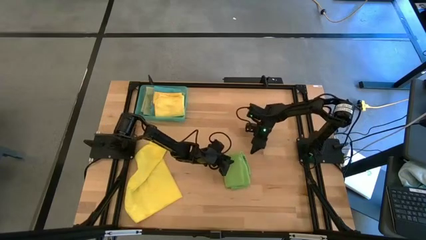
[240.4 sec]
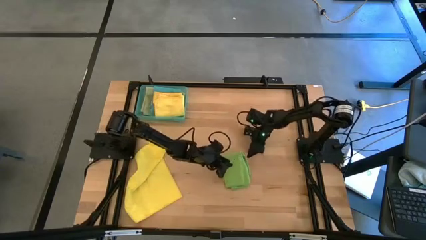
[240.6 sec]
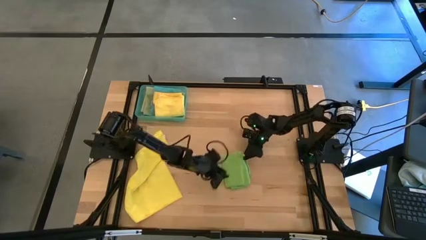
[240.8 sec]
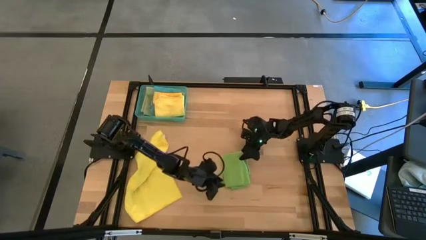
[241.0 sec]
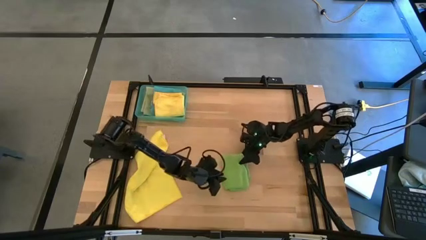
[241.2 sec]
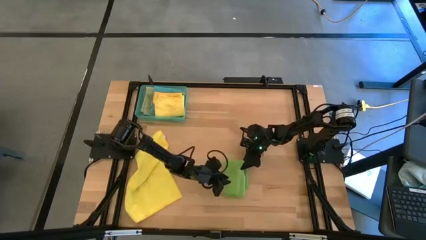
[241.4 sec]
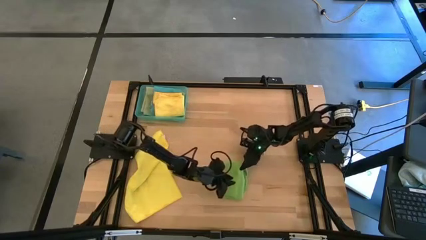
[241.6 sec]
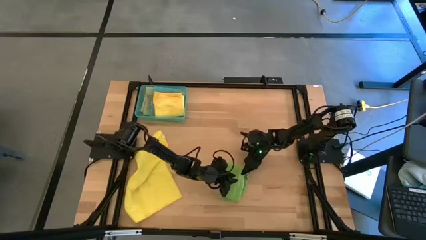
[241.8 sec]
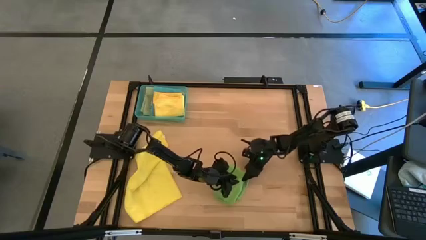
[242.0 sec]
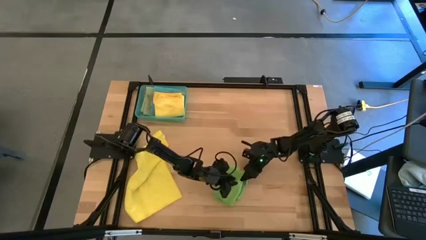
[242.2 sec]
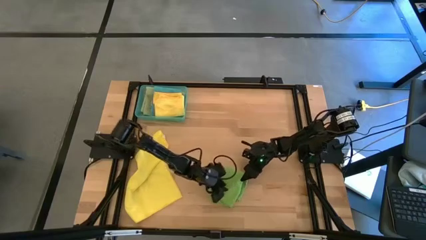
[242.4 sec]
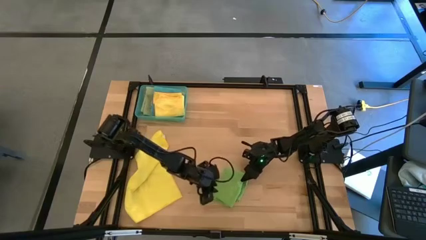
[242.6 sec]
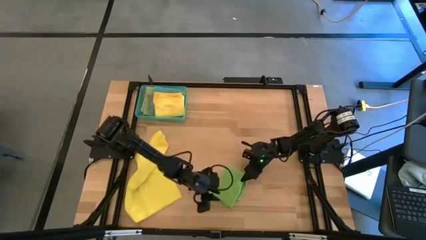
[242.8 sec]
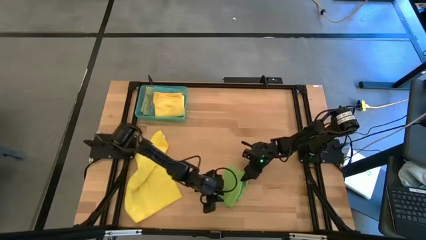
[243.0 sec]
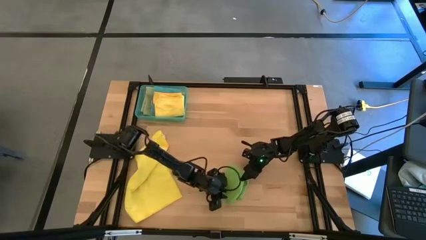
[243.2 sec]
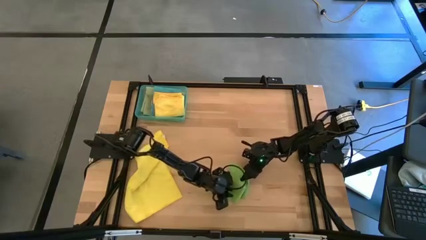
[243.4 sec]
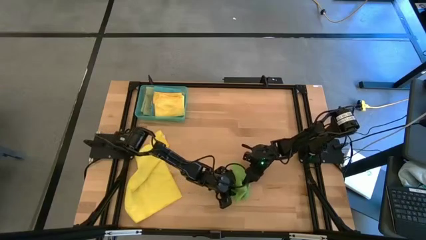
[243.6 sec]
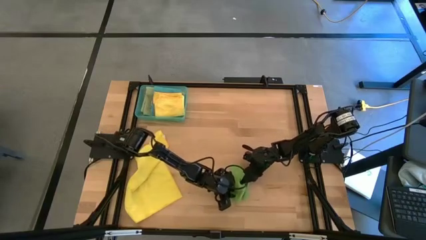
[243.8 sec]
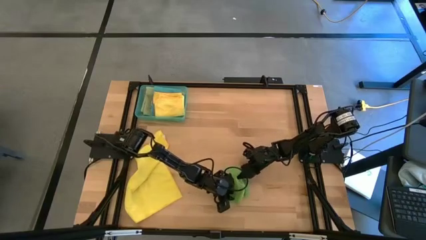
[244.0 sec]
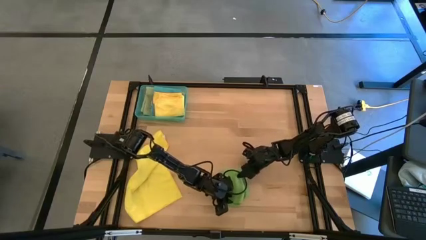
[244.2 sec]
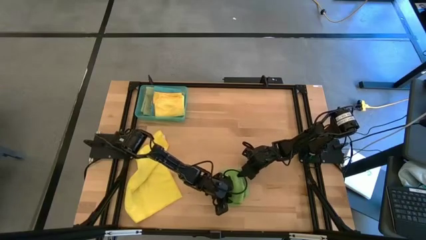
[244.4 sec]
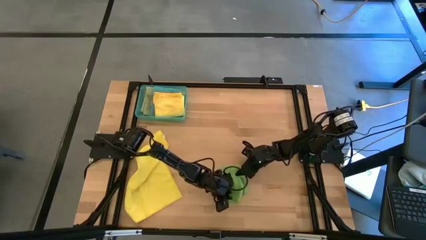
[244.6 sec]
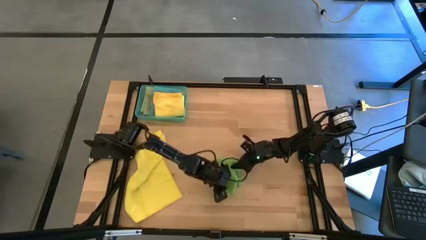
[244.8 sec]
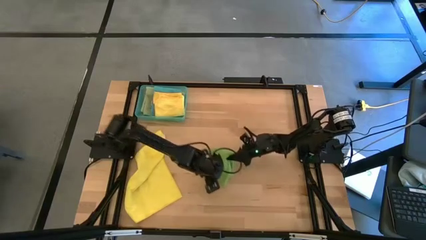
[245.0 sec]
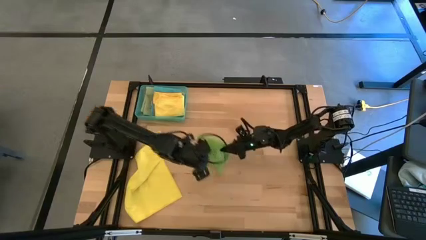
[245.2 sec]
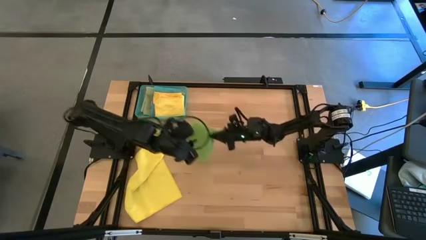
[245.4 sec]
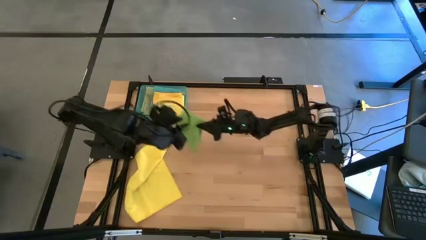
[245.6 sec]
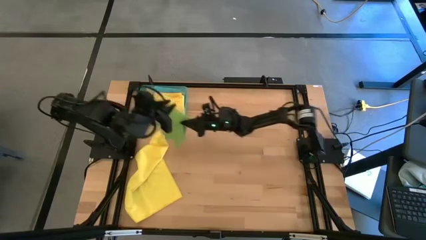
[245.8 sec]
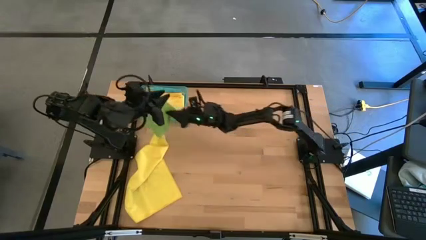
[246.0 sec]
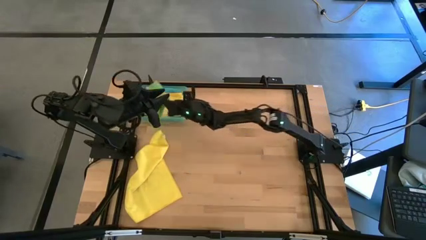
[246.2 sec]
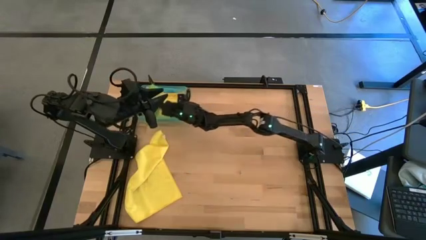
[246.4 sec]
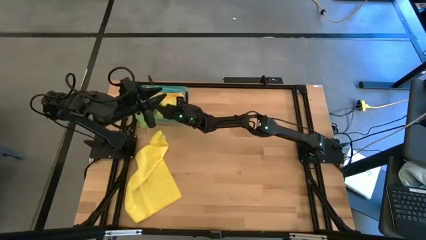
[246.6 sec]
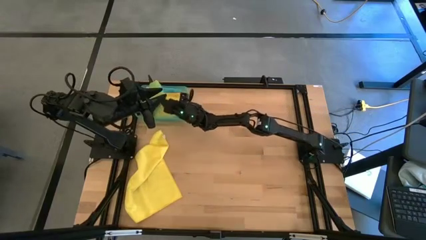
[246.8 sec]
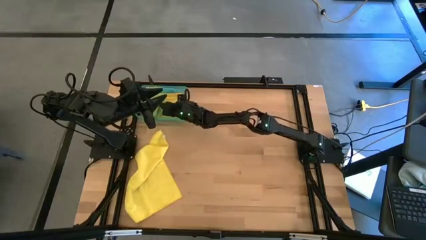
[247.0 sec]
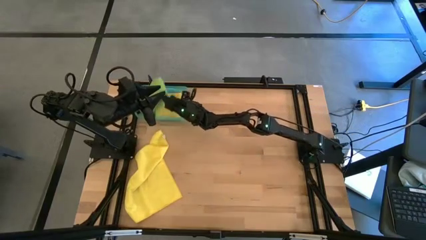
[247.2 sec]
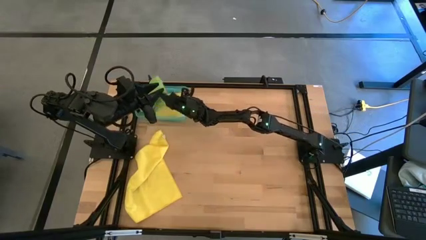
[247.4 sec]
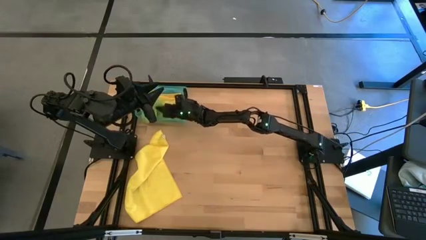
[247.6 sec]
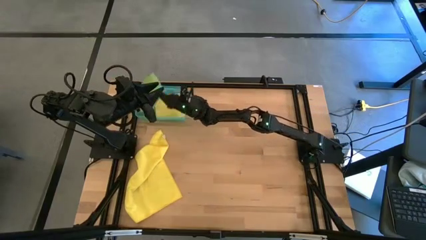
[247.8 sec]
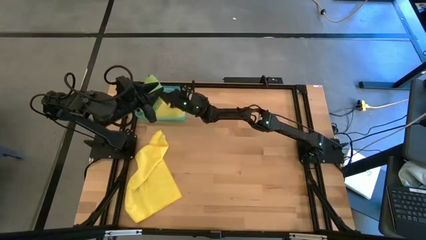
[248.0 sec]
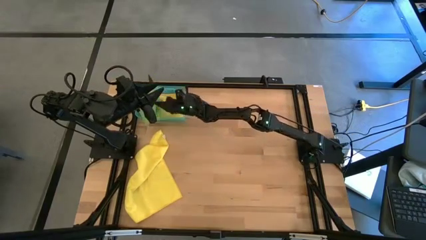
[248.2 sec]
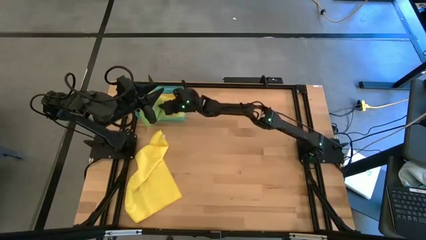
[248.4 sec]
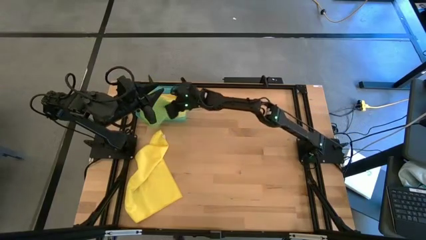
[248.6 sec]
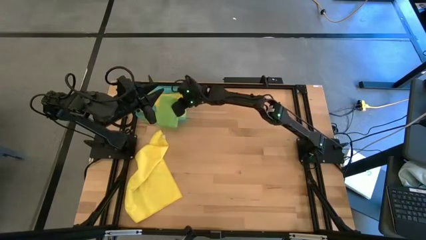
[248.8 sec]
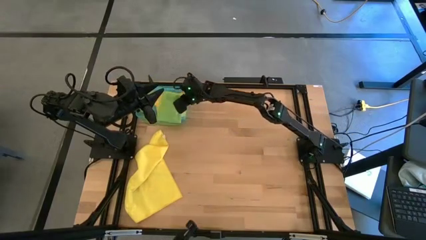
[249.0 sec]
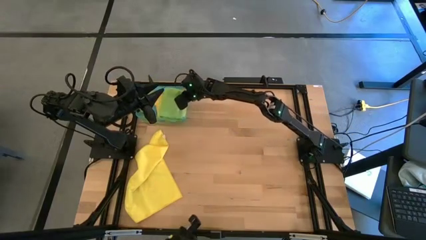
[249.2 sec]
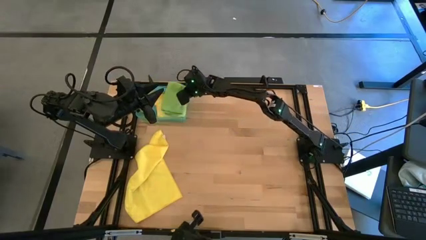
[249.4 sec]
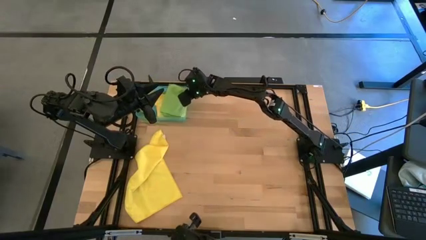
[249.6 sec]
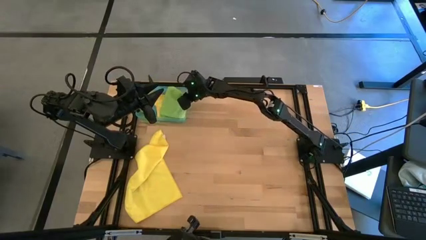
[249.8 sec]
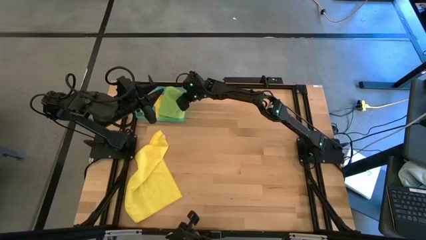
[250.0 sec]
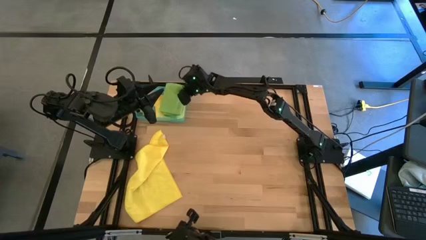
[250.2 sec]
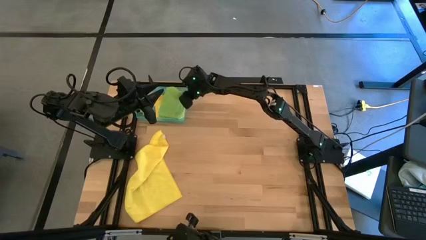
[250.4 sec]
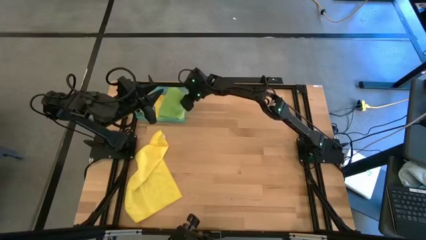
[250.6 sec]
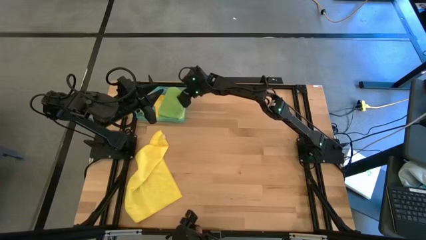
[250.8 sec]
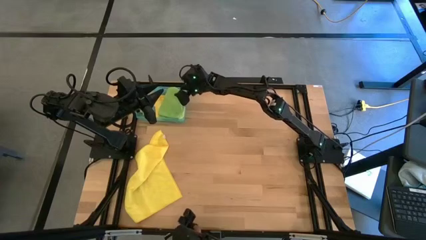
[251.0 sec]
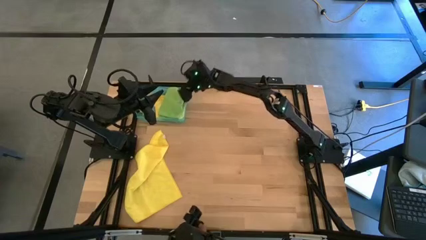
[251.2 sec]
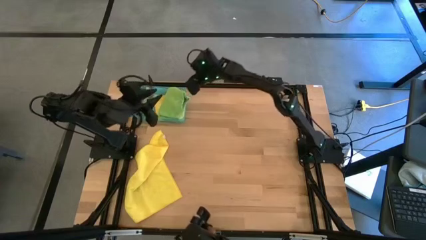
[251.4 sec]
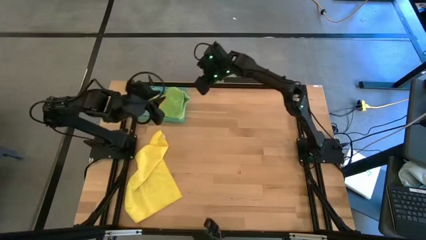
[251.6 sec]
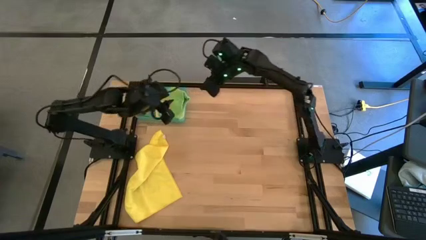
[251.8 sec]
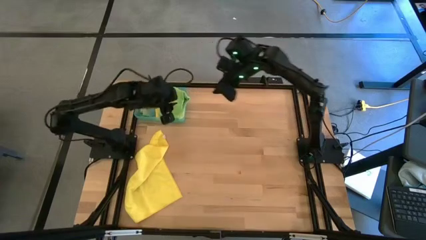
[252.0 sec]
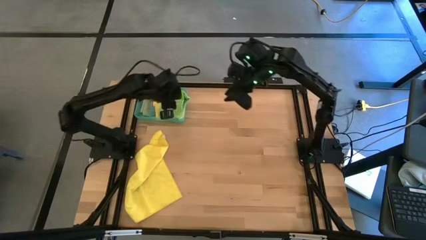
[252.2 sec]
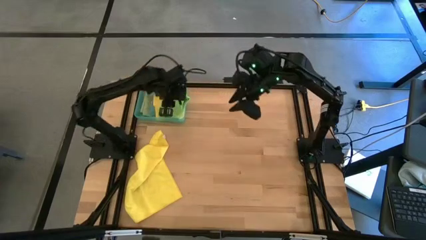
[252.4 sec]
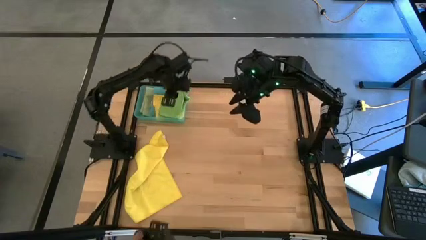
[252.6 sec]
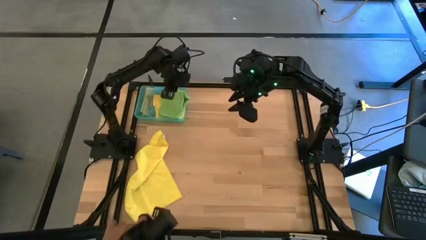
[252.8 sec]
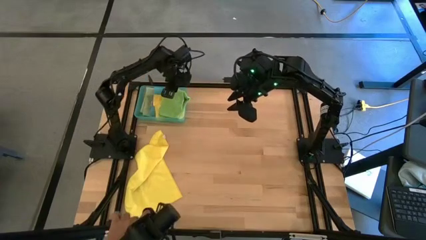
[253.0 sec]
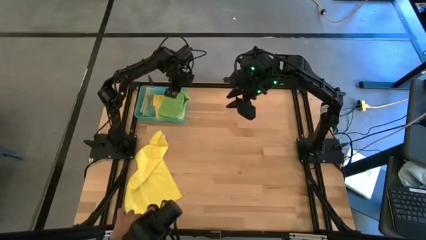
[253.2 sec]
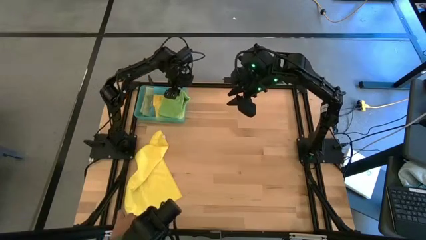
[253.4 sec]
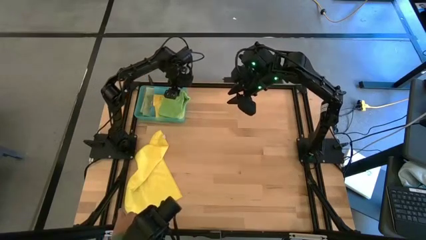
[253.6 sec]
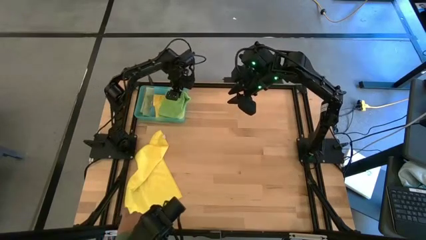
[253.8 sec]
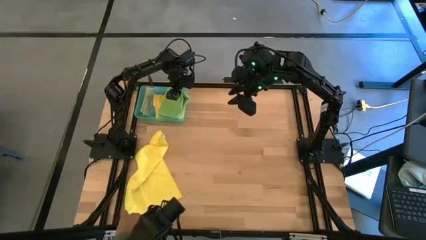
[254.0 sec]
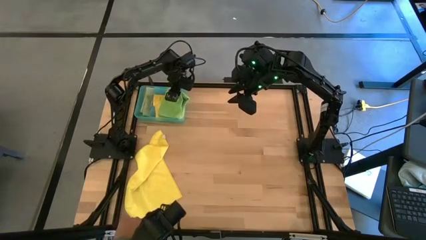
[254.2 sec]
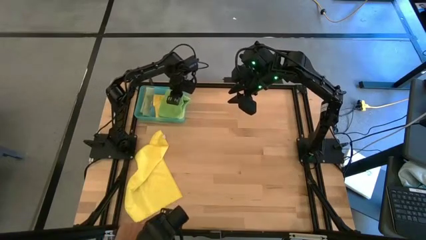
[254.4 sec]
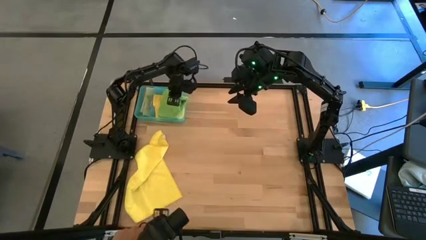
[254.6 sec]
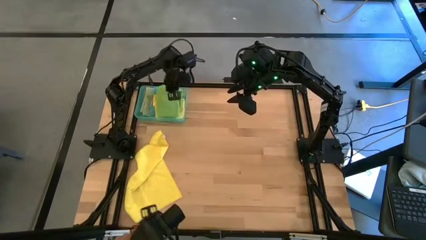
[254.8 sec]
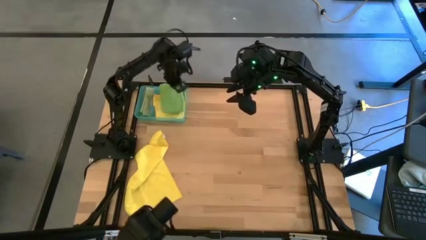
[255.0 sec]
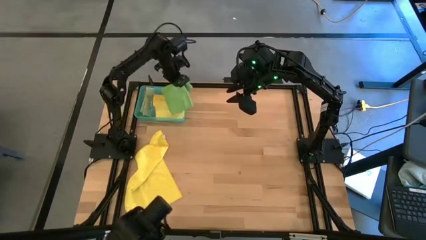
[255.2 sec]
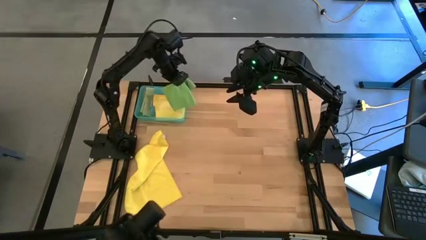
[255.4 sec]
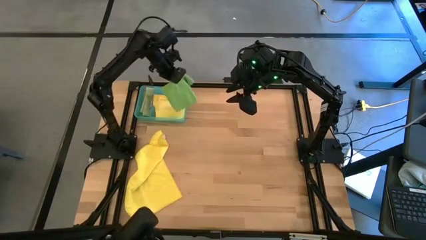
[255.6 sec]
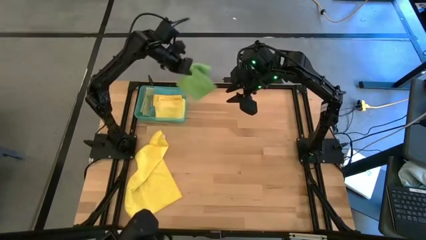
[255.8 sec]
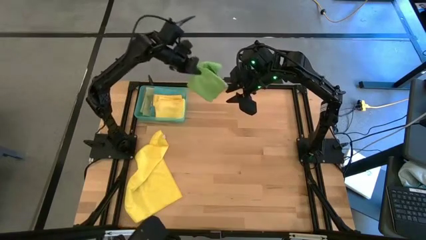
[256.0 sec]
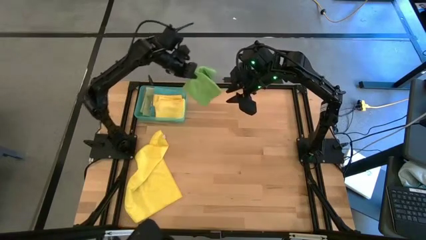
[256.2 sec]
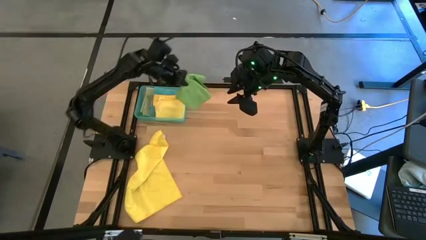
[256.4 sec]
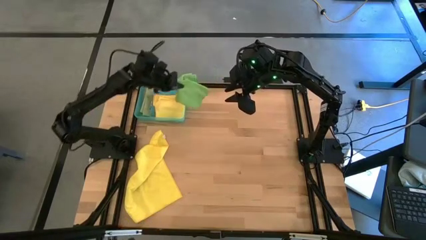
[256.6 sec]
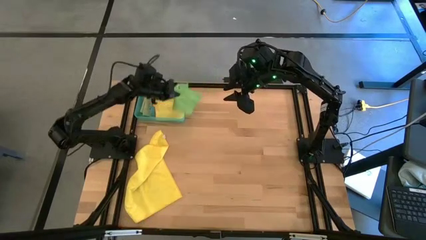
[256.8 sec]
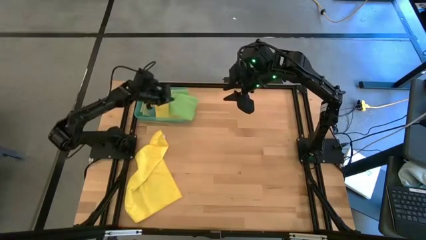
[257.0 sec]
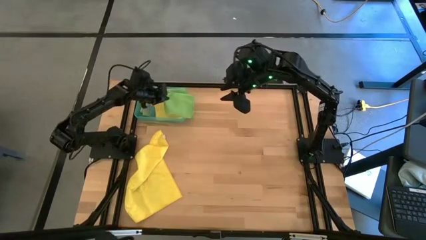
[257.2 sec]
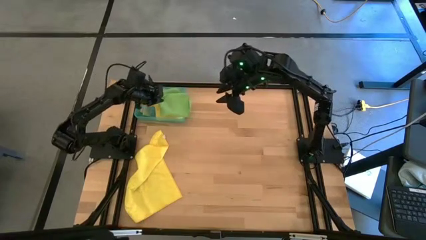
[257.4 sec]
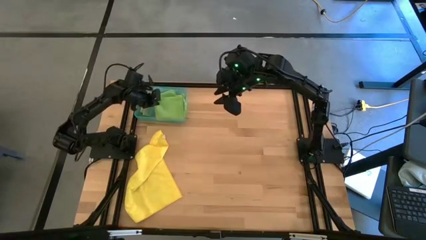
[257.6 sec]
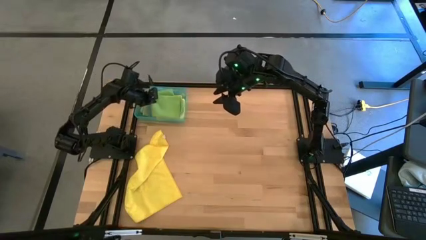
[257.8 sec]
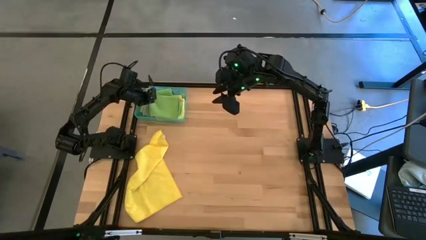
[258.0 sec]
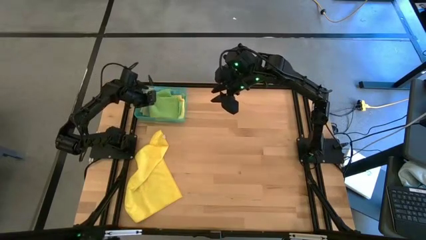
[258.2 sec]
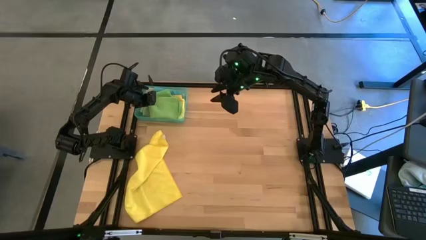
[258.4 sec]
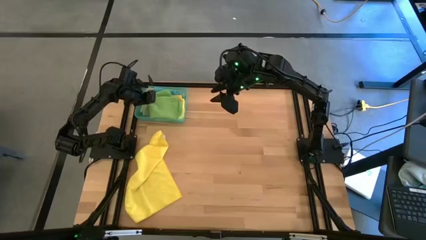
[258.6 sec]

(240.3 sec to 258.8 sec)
Task: Fold microfiber towels
Stack the folded green microfiber cloth on top of the yellow microfiber cloth in the blue bin
